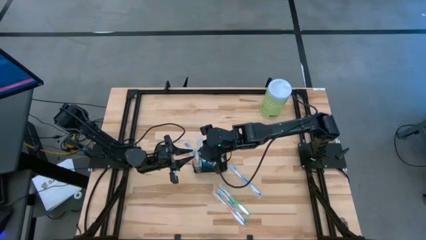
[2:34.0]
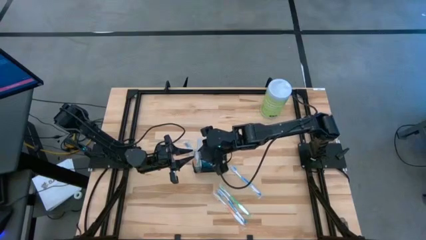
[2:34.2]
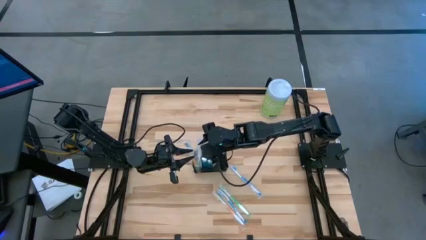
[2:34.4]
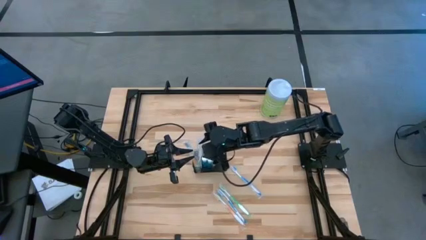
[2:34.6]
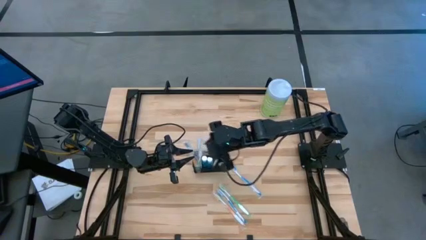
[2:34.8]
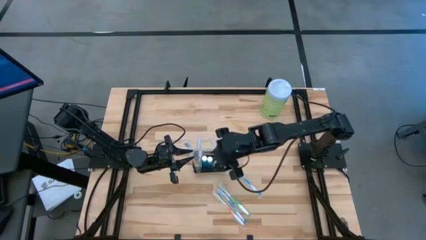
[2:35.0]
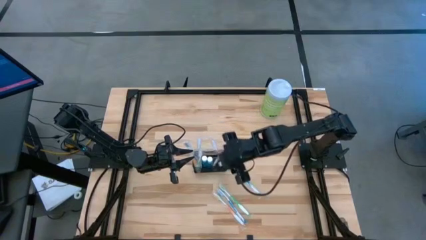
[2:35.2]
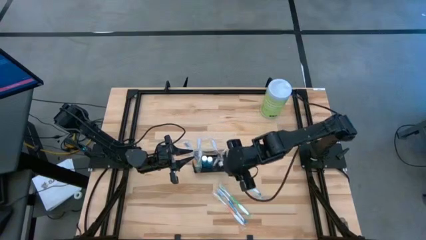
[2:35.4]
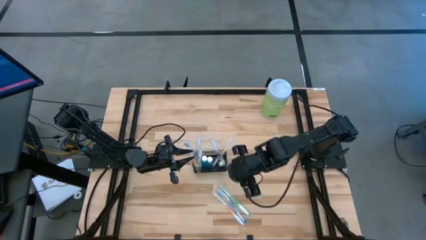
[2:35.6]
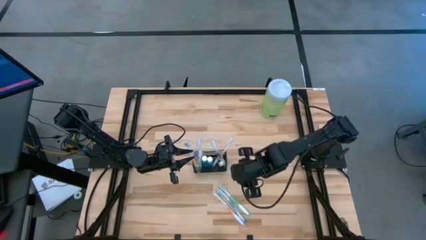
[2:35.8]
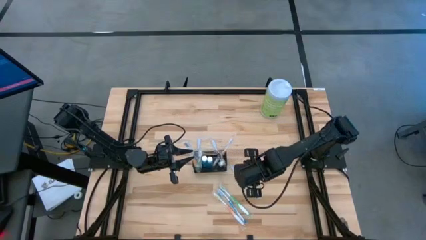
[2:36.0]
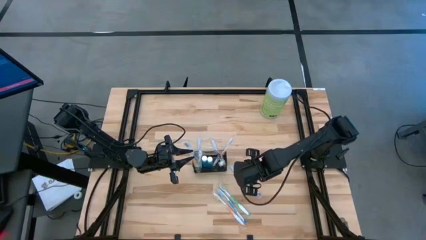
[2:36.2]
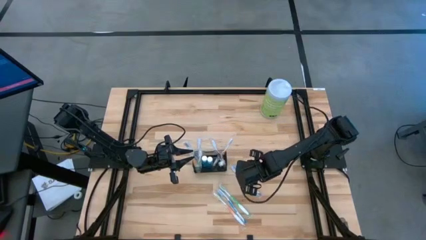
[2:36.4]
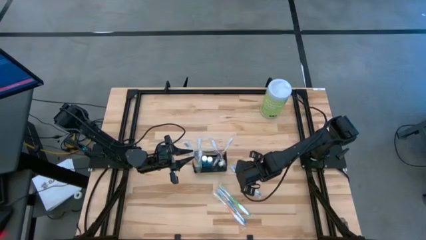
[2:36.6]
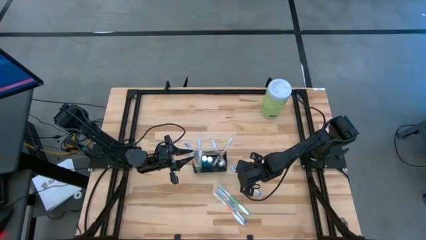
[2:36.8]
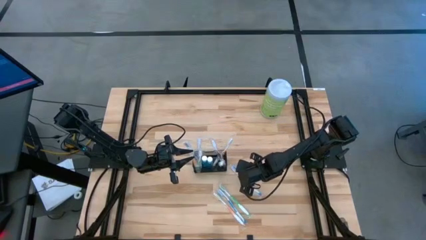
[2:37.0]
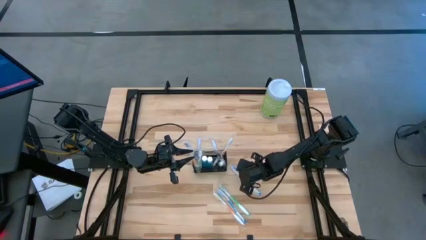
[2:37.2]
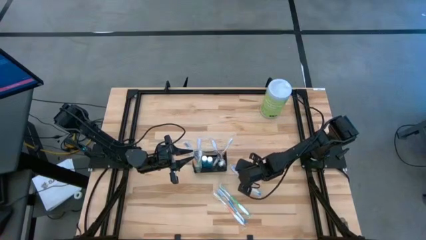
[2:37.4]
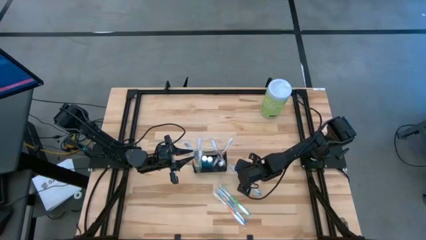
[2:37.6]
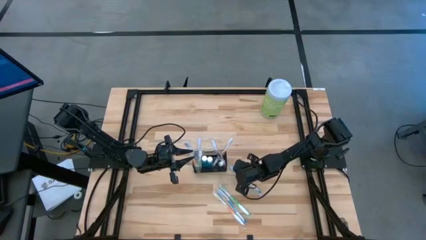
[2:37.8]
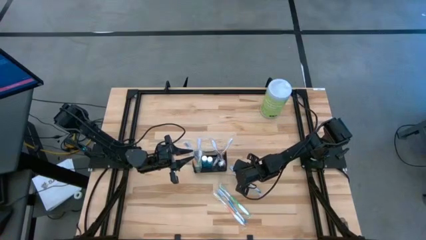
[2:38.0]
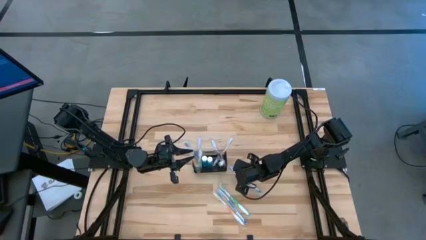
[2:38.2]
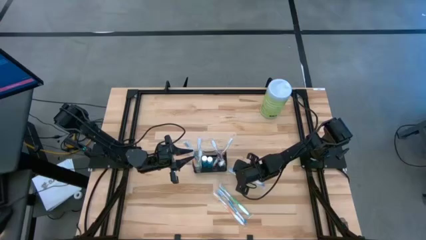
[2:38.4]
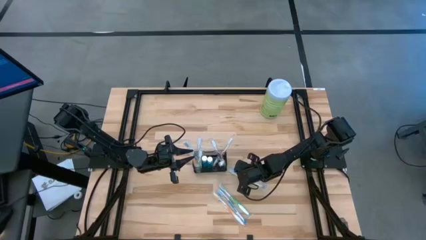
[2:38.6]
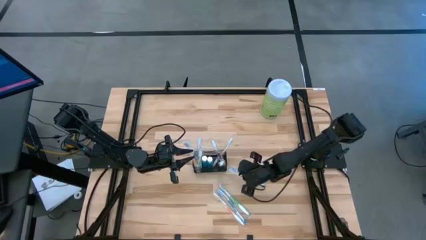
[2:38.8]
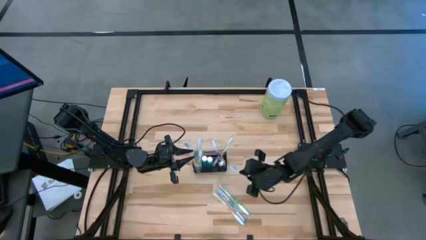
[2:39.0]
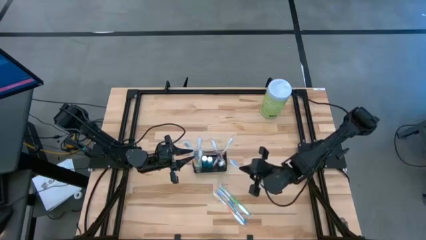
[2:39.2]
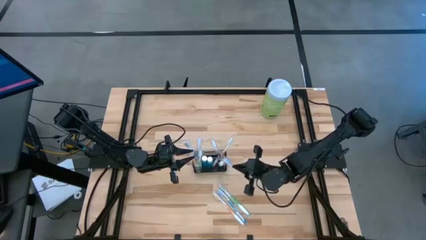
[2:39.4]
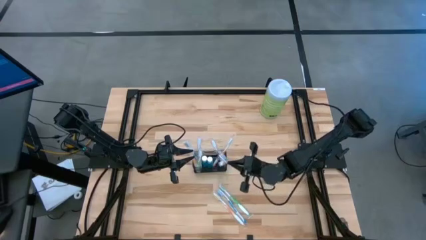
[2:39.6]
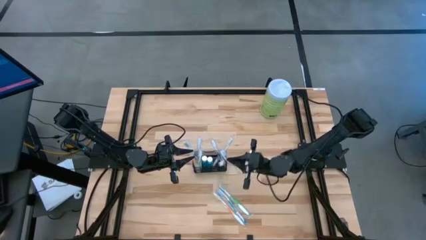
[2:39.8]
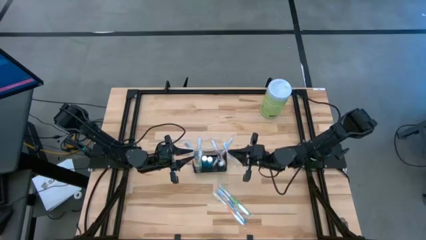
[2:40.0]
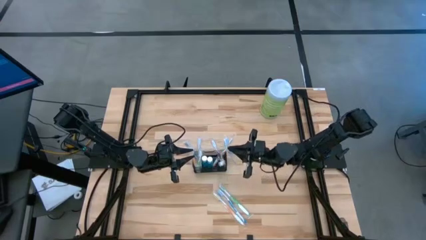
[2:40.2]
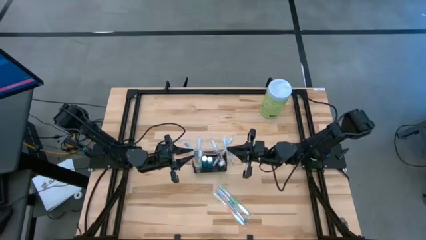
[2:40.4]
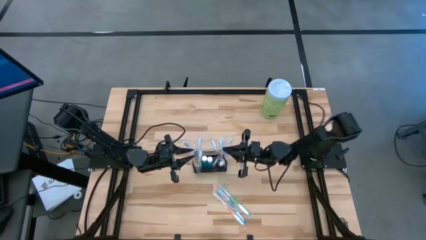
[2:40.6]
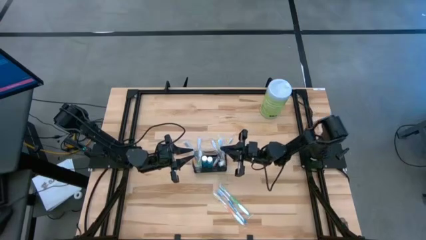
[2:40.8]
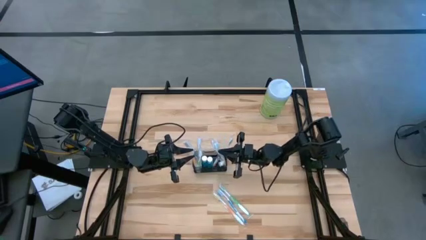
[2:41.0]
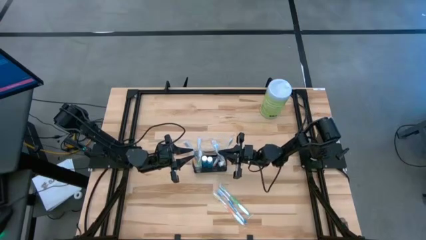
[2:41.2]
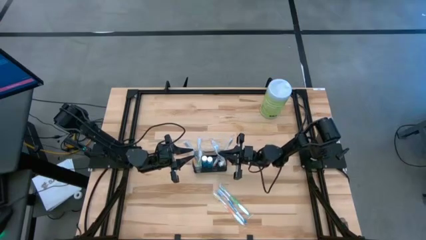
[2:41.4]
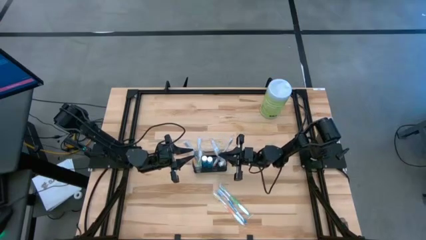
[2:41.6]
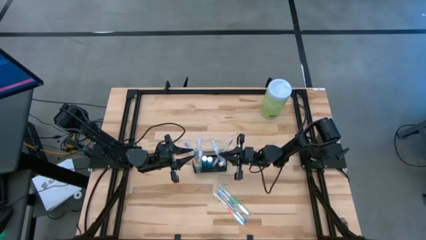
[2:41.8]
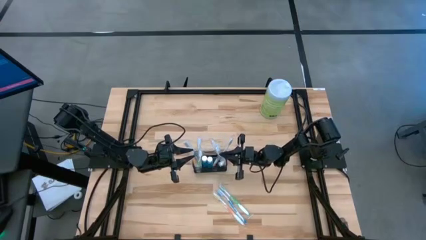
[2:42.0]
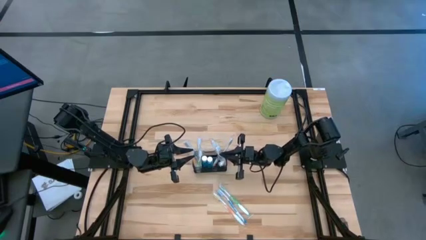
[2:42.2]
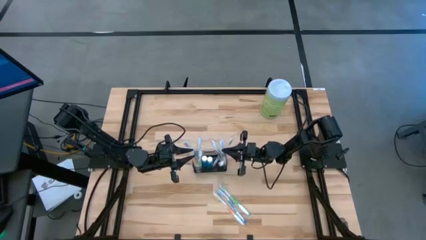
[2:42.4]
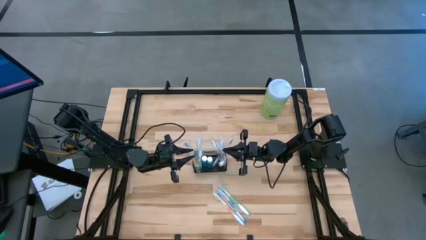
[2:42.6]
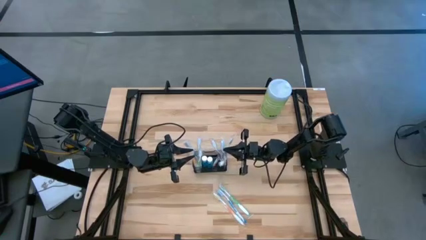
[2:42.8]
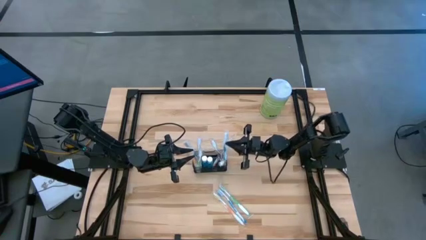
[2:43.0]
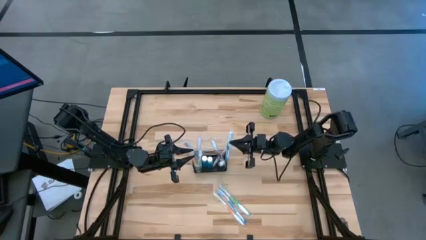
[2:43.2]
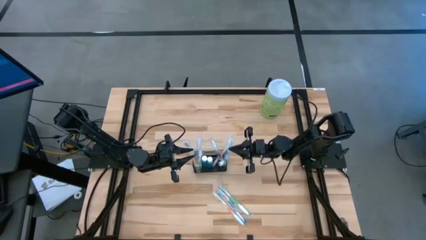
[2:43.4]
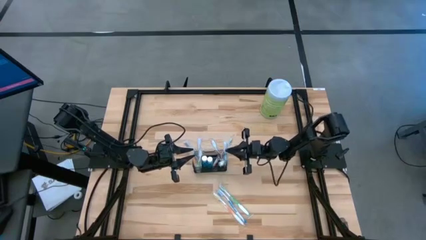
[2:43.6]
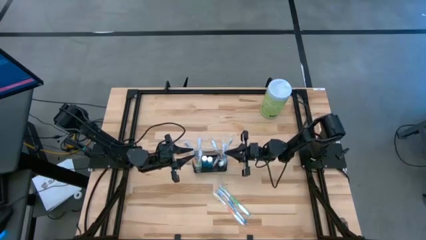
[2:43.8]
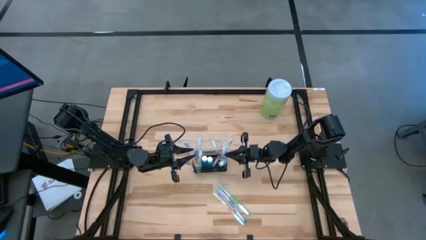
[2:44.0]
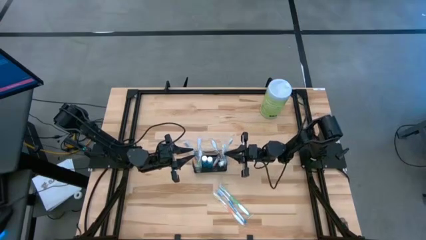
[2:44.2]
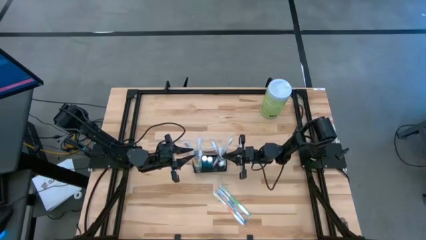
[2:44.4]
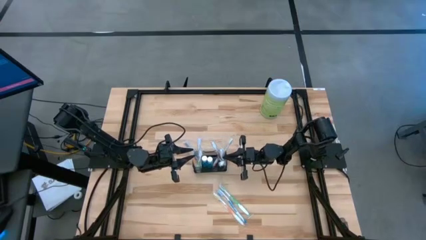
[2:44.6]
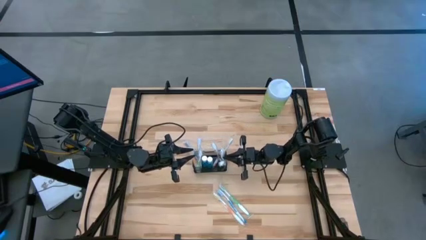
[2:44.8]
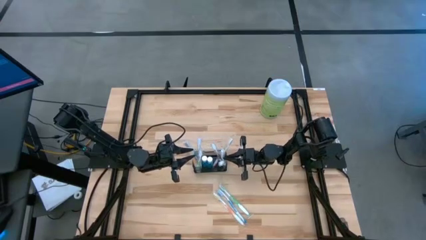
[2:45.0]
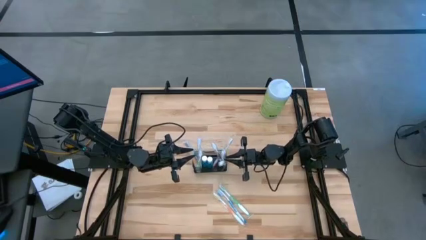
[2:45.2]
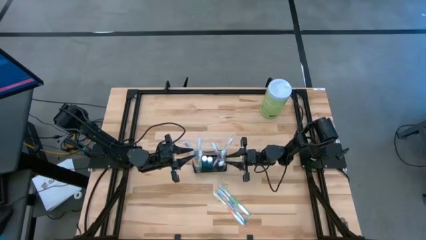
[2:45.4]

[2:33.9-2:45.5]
Task: Pick & Place toothbrushing station
Put the blue toothbrush into the mesh

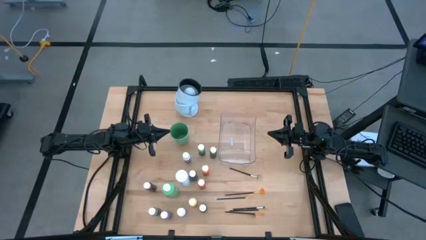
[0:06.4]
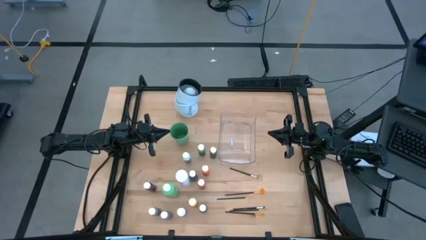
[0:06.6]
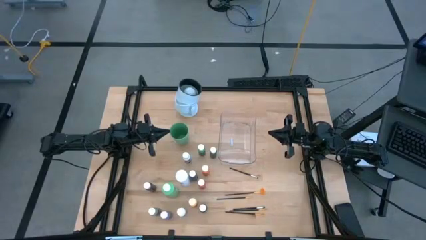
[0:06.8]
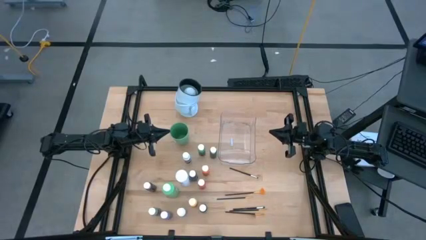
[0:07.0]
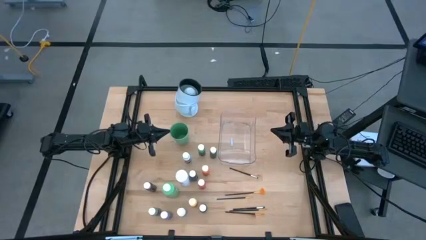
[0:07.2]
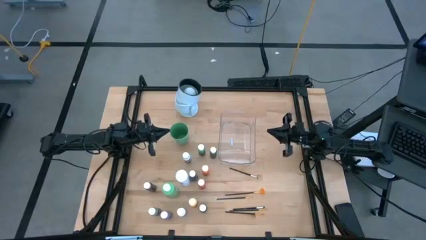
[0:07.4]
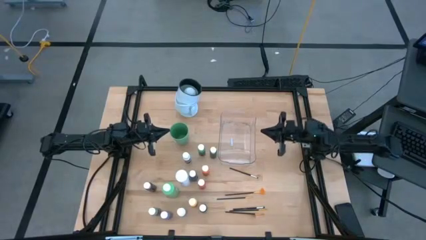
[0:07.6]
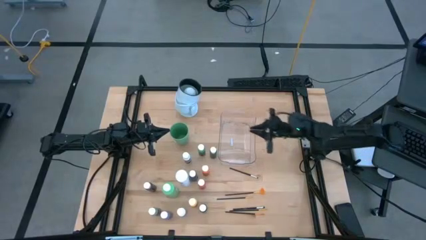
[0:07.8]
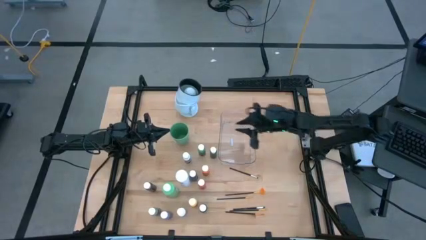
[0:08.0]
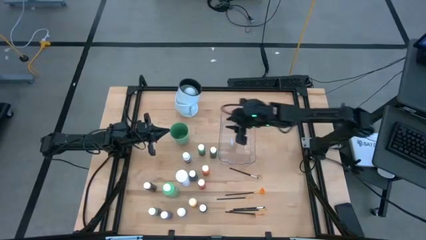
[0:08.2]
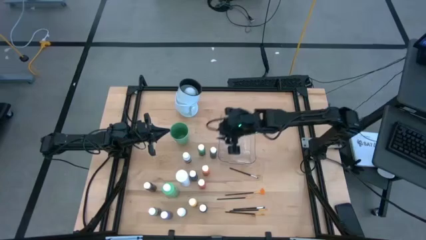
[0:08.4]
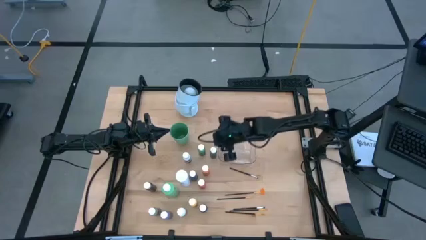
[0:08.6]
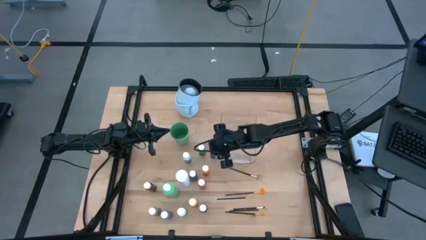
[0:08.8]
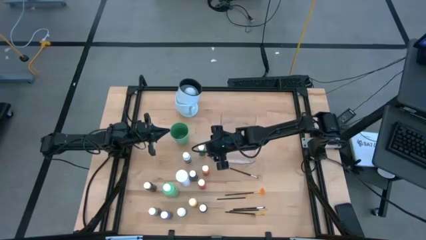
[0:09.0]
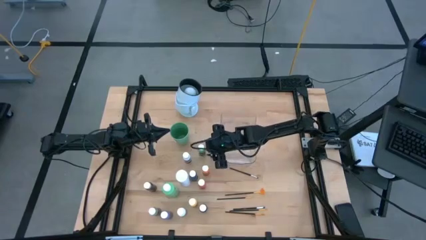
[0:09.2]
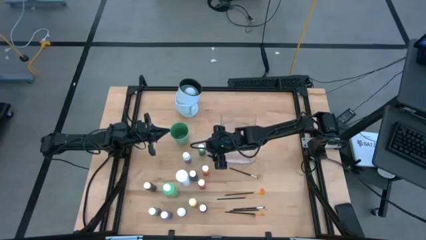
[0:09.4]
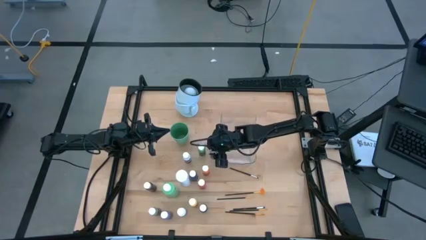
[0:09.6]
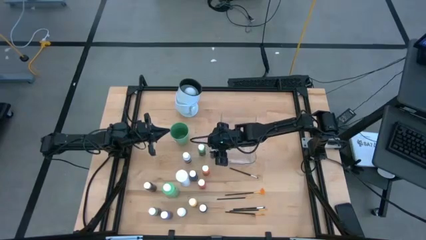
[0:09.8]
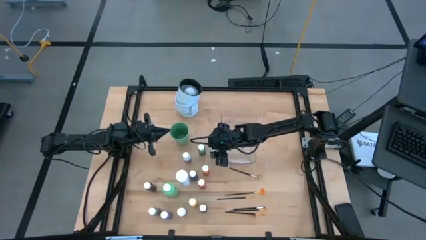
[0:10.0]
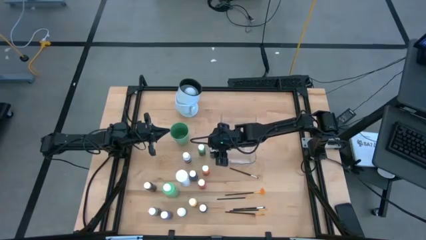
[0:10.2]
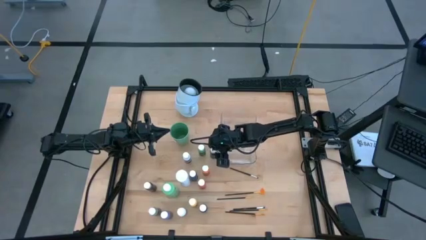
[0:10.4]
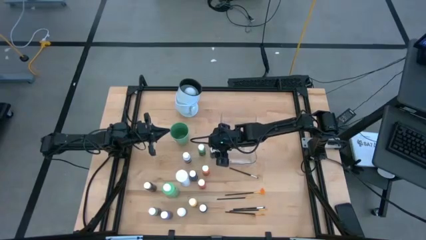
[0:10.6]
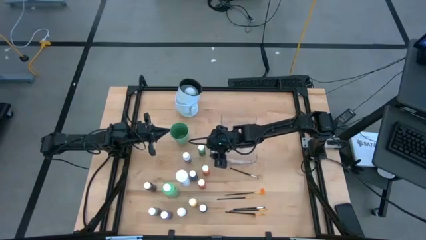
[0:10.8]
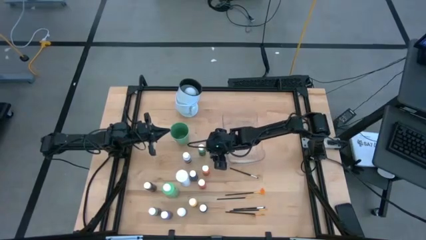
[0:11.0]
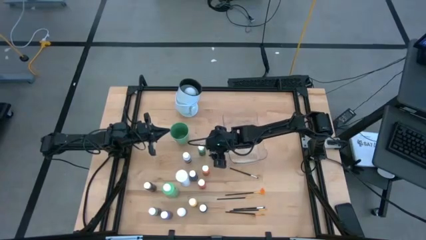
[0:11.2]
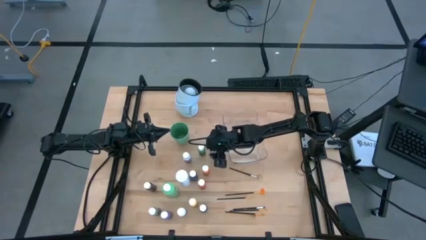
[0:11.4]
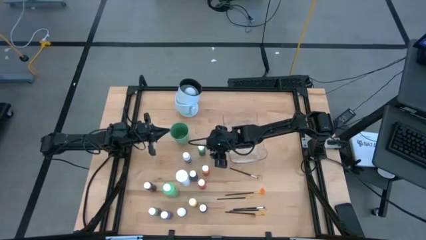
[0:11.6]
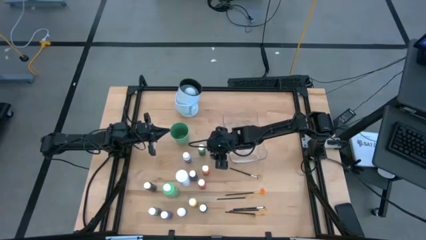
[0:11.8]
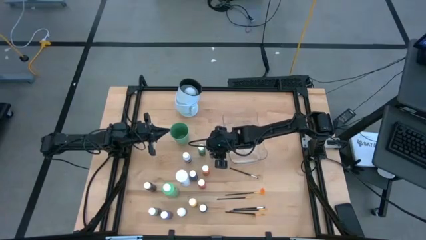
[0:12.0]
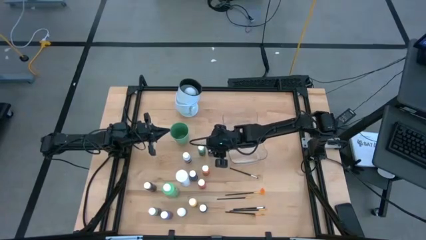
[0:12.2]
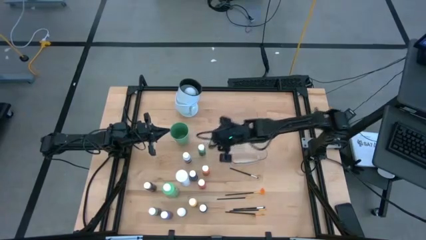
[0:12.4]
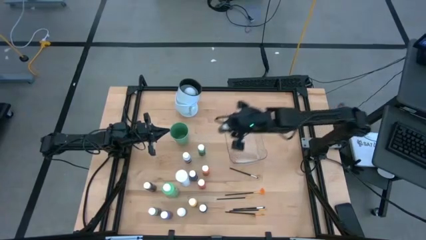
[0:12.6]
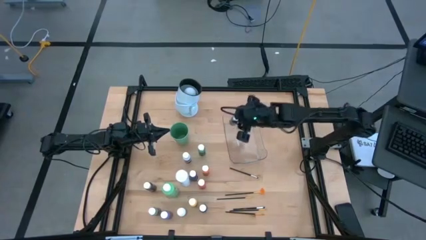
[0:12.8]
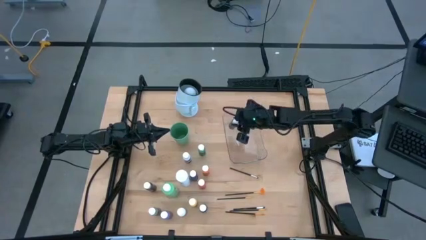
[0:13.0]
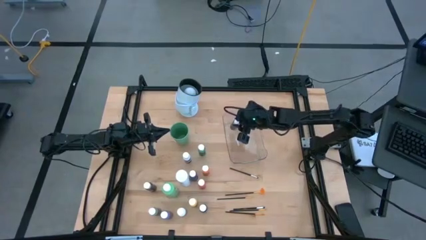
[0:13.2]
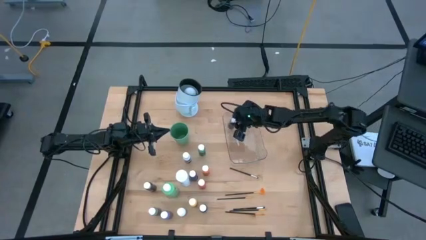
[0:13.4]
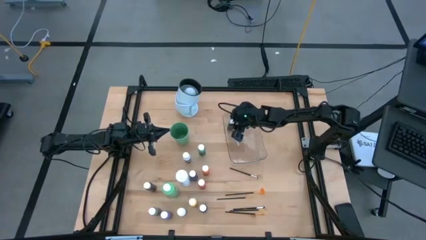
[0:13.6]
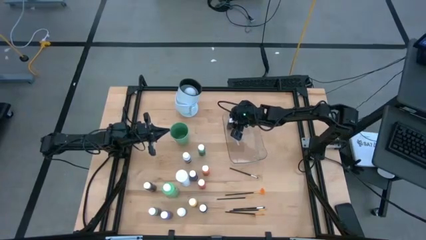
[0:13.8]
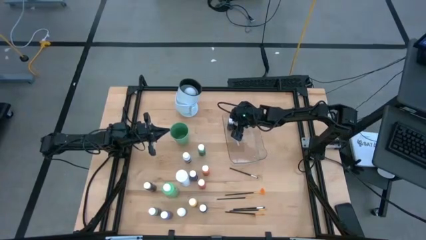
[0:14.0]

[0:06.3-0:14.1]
Task: Pick & Place Paint Supplies
Put the dark green paint bottle into the transparent bin
